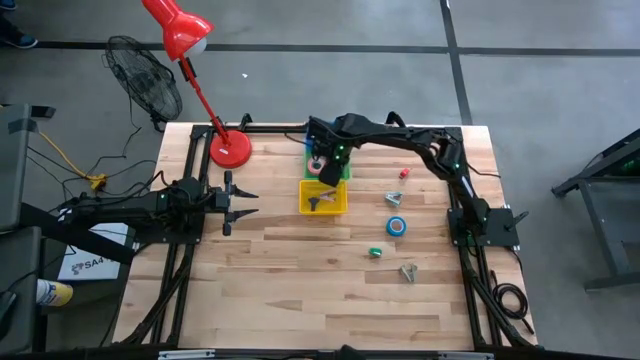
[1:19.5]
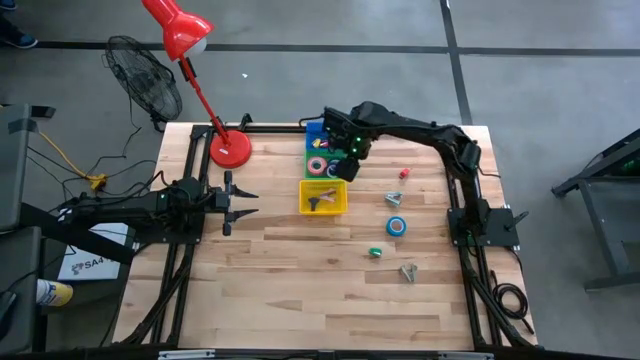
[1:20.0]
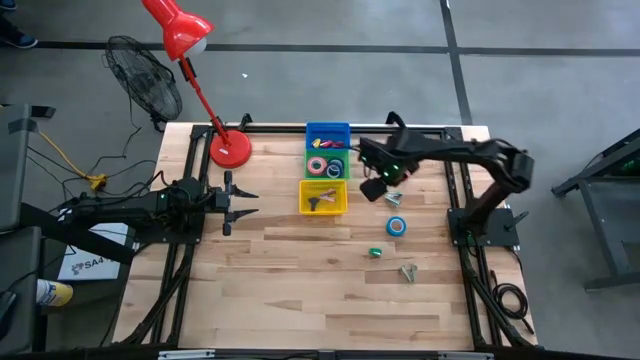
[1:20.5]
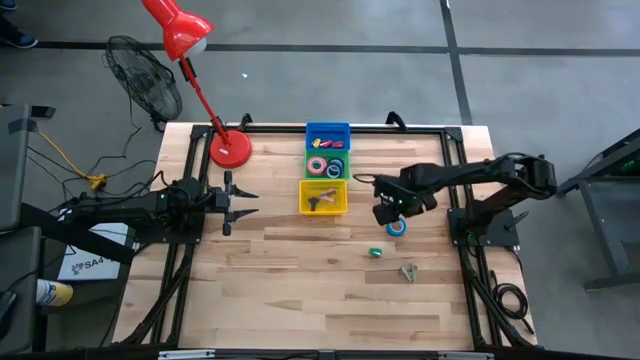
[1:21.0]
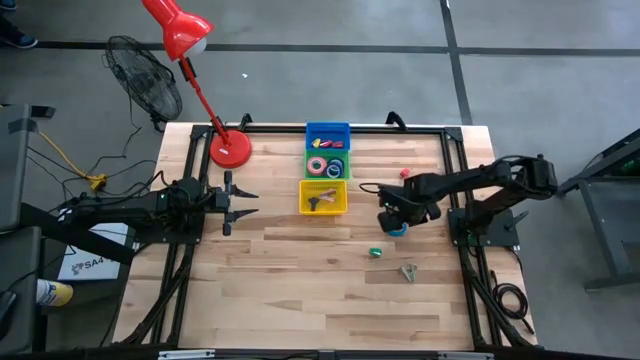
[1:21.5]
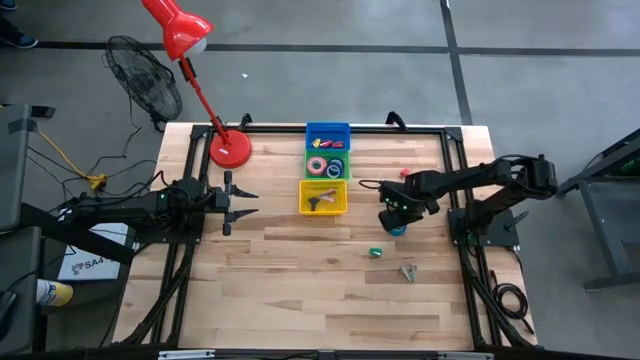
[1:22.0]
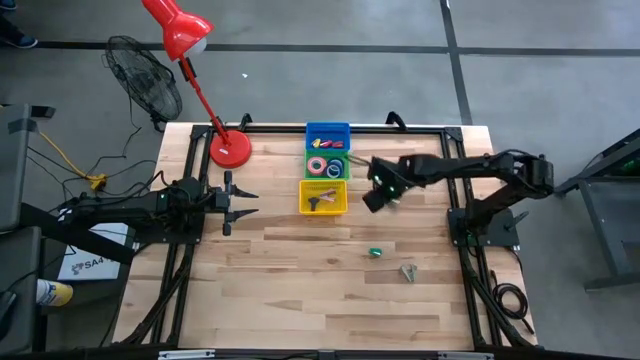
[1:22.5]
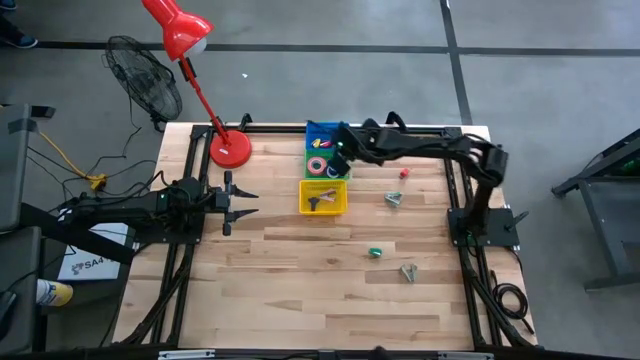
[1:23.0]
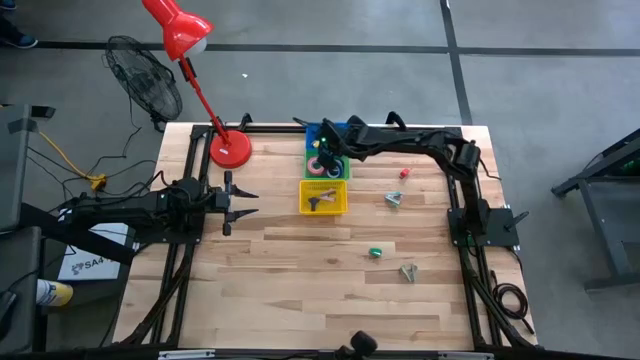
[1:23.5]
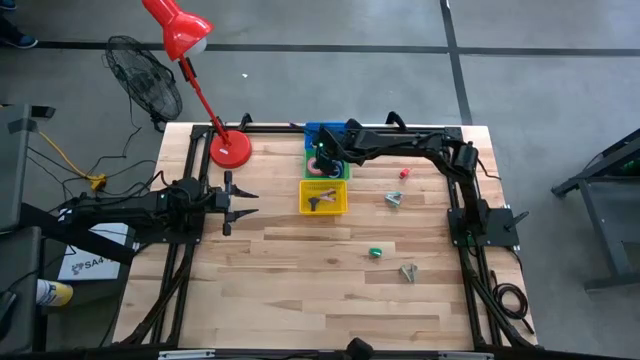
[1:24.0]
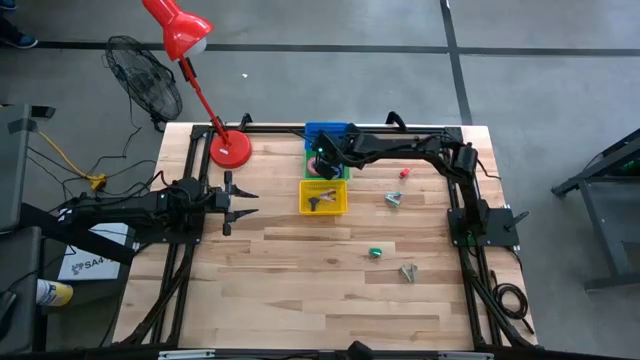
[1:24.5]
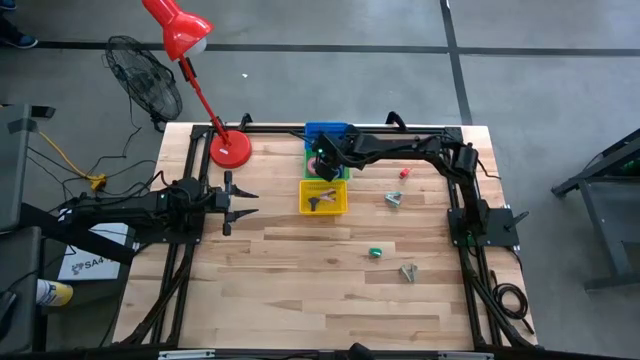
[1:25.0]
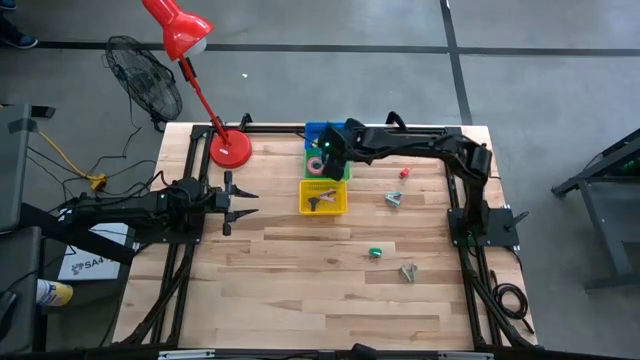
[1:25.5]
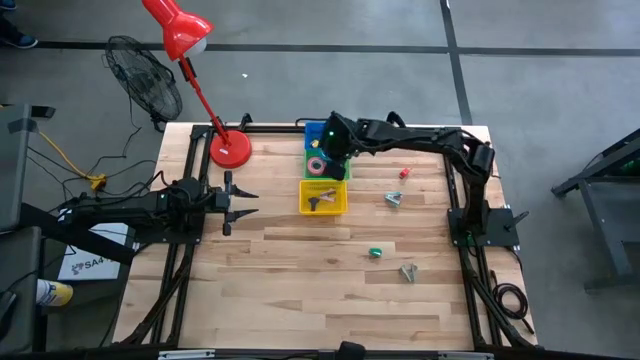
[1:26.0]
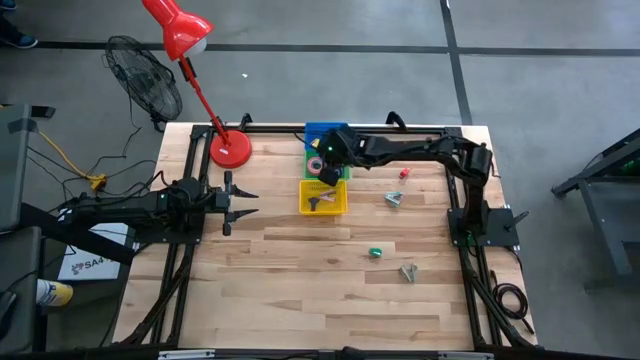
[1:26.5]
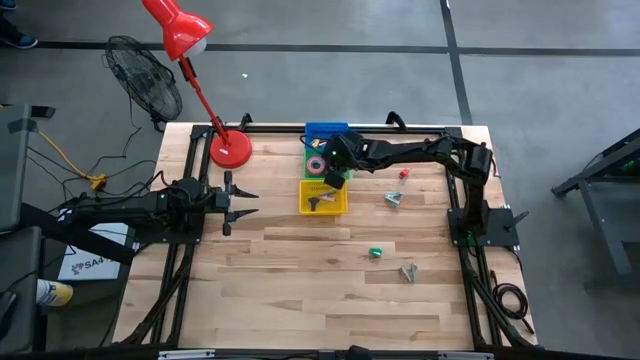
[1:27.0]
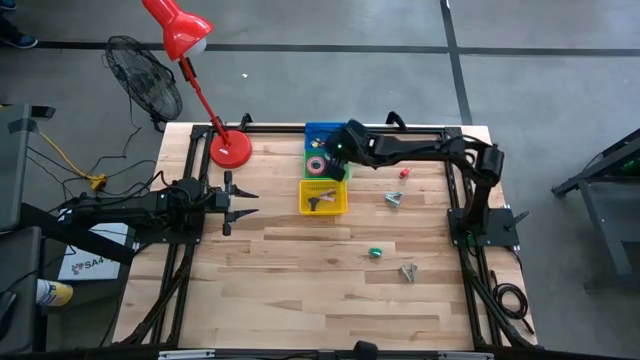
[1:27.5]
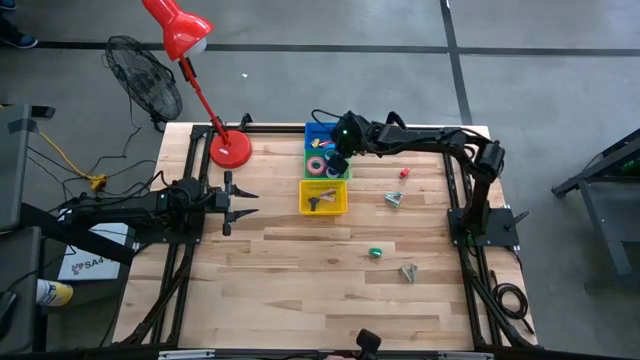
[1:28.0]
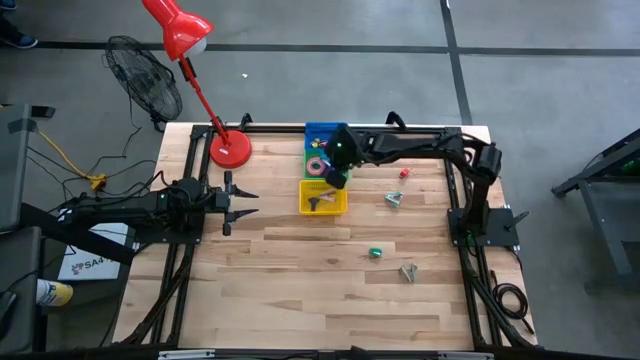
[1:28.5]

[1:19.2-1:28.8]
Task: Pick and place Stapler, Stapler remover, tape
Put the light blue tape into the green bin

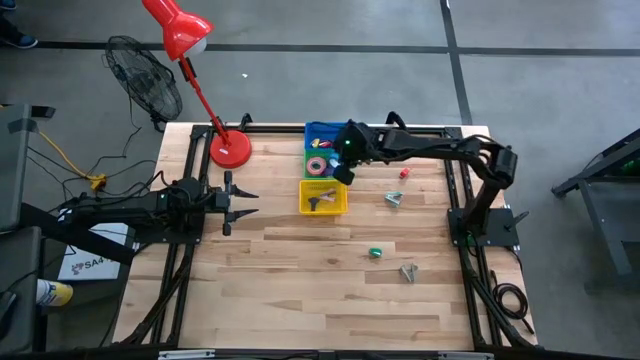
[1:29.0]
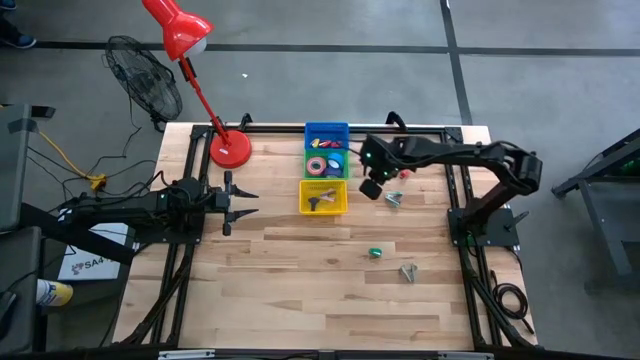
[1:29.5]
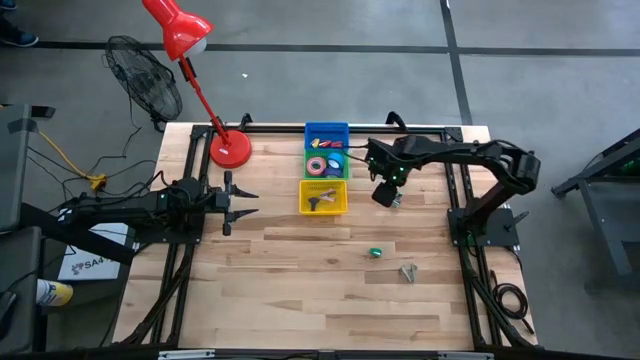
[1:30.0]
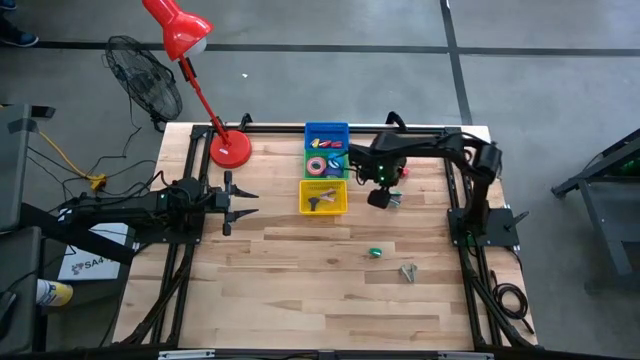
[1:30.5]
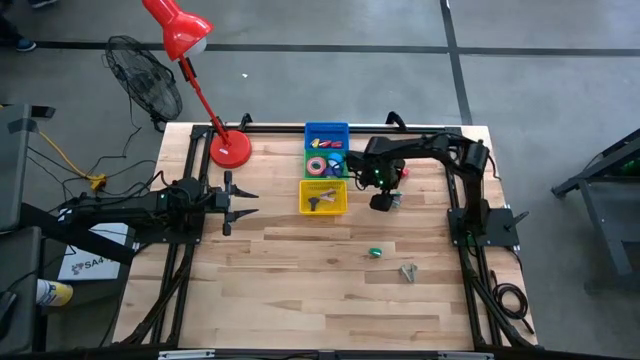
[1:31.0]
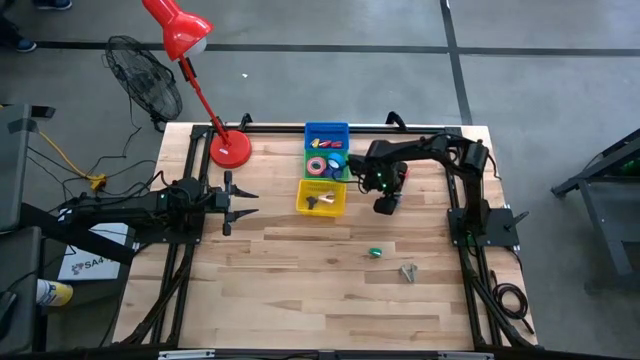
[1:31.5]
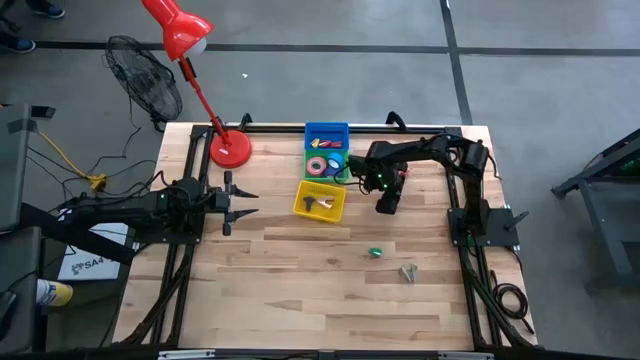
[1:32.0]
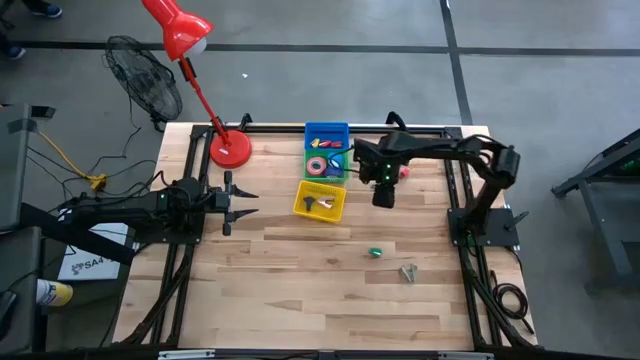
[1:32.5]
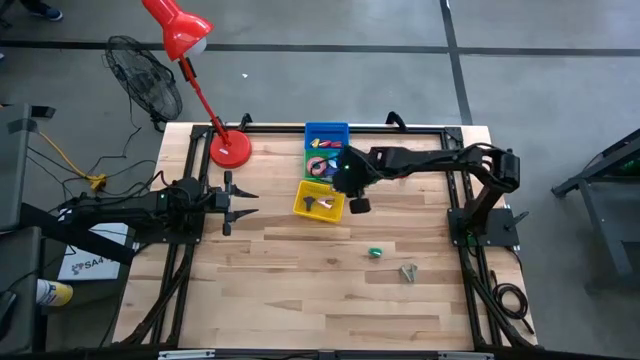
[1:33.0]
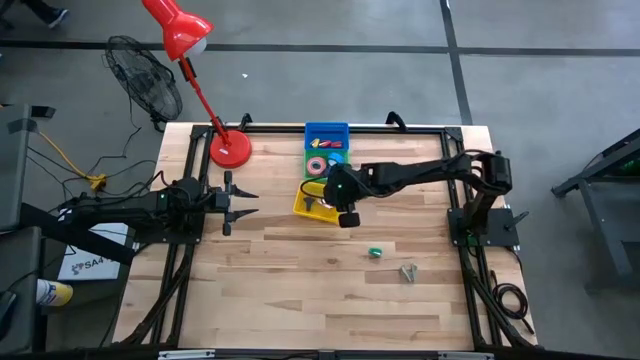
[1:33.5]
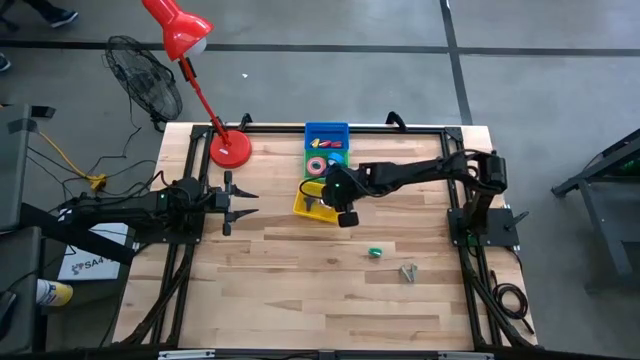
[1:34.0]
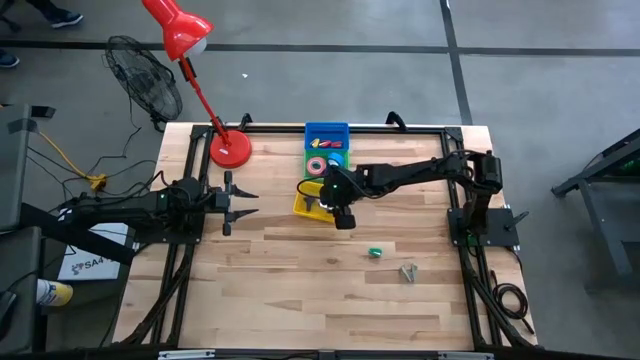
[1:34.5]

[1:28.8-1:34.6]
Put the light blue staple remover into the yellow bin

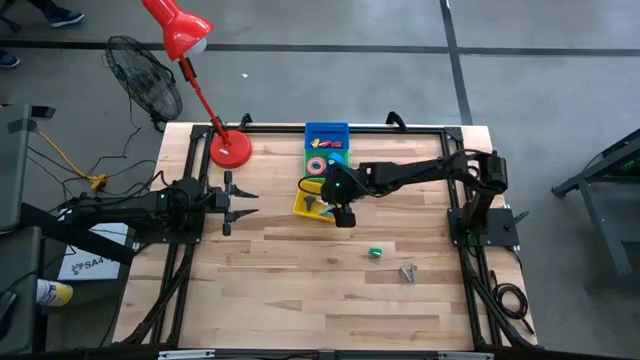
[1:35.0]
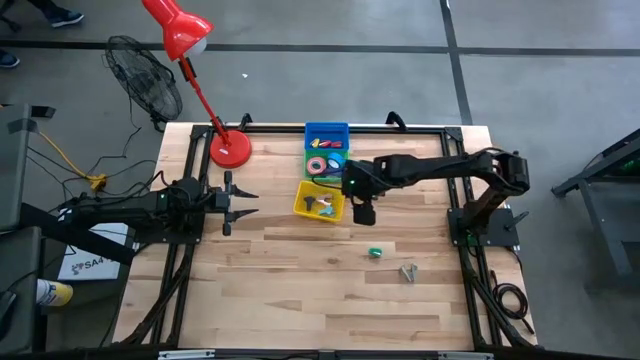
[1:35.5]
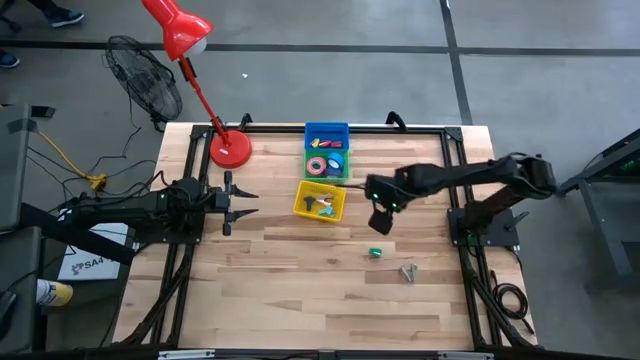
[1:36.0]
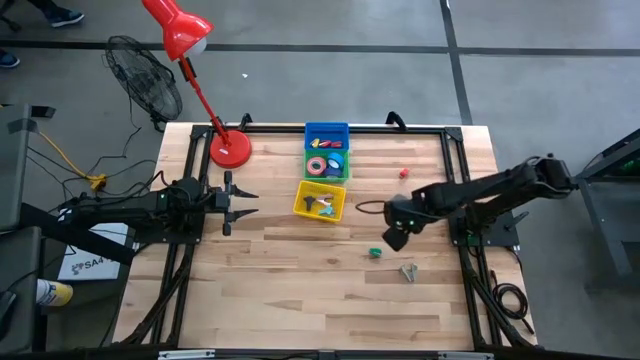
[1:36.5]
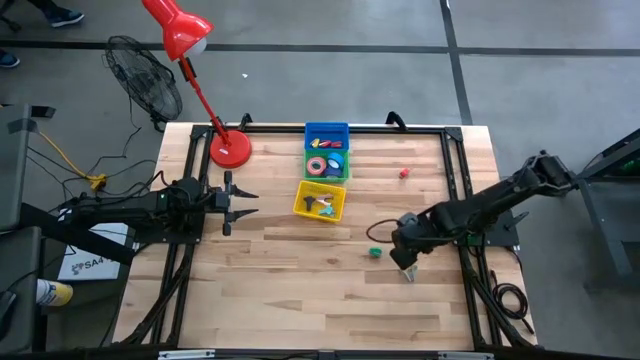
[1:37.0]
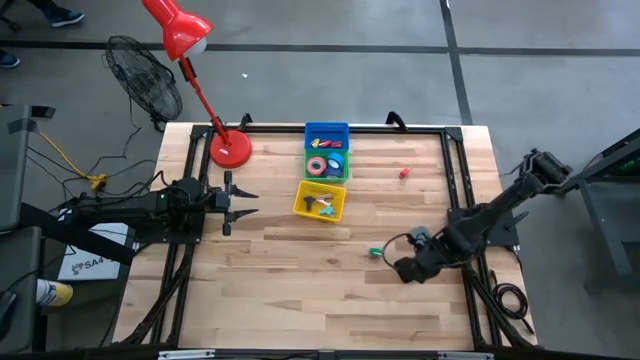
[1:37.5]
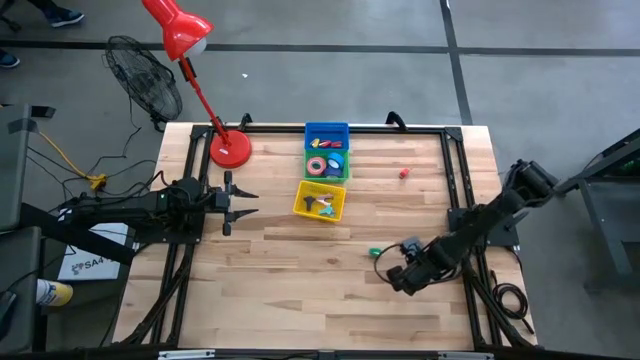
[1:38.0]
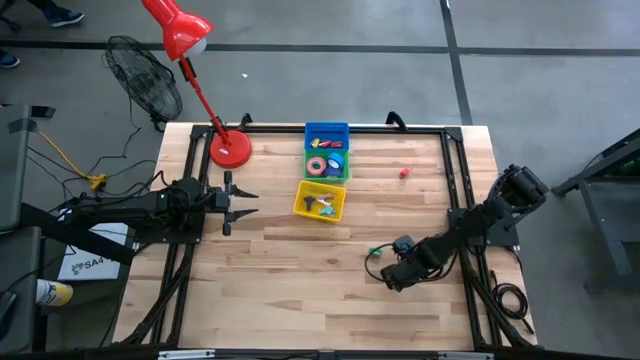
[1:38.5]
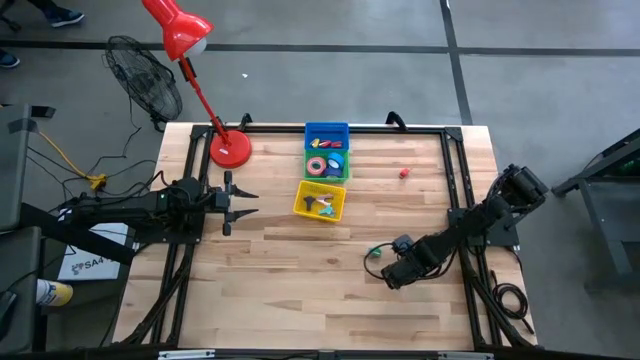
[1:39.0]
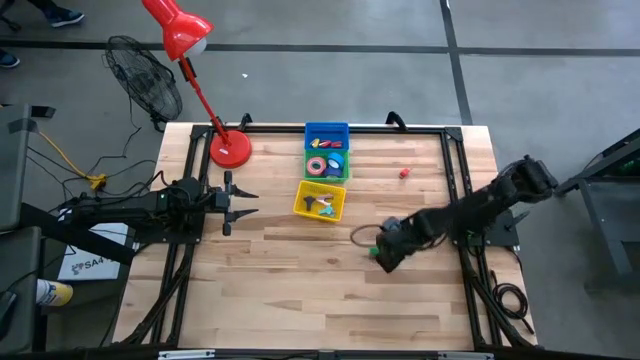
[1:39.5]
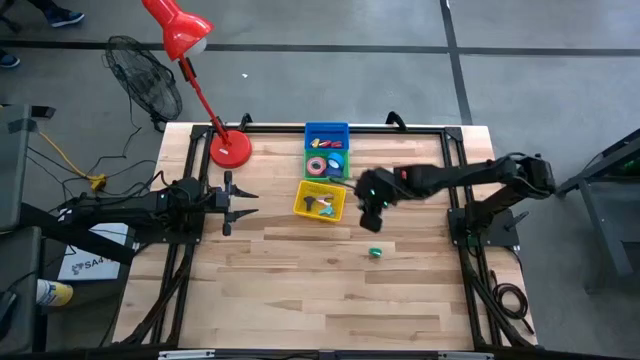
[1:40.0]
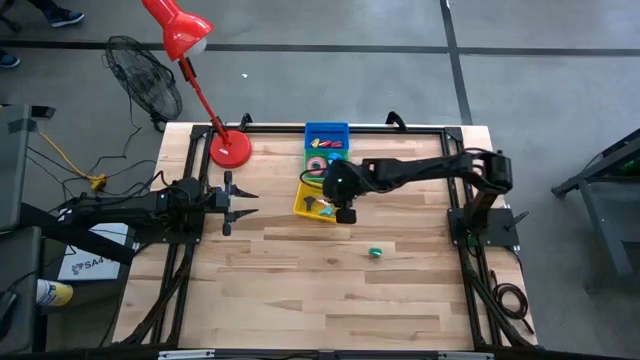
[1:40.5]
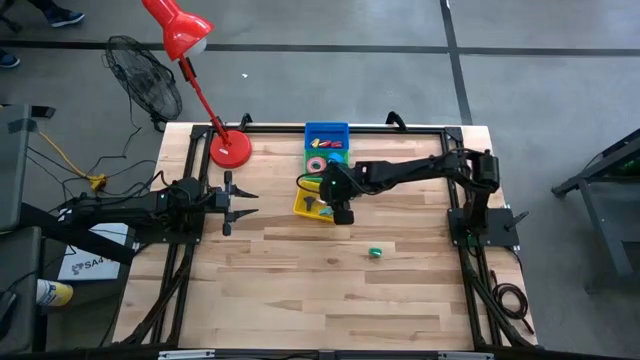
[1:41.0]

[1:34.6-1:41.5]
Put the gray staple remover into the yellow bin
